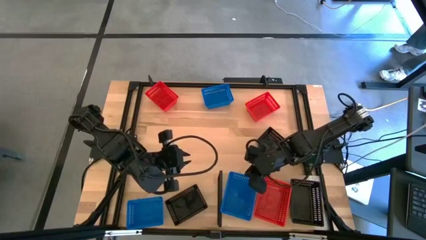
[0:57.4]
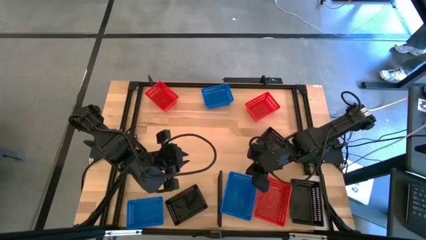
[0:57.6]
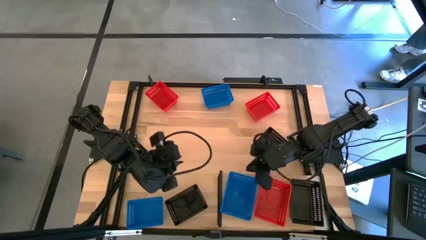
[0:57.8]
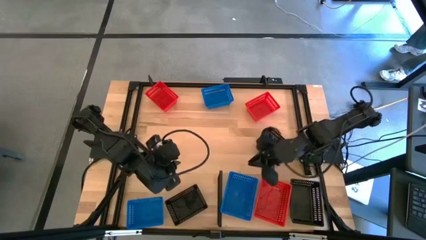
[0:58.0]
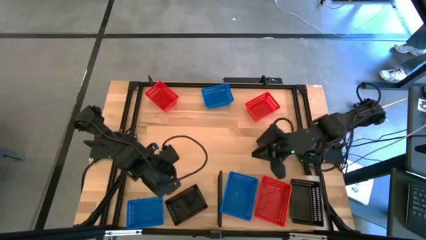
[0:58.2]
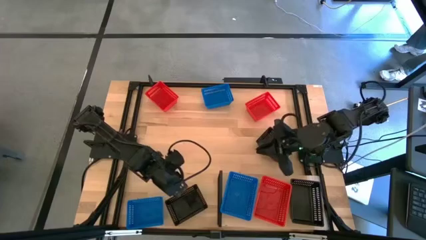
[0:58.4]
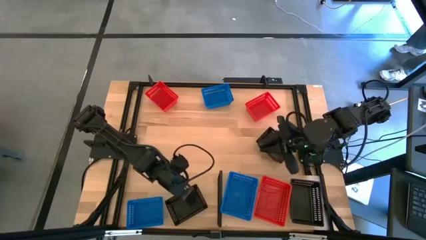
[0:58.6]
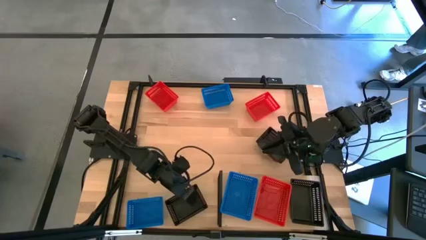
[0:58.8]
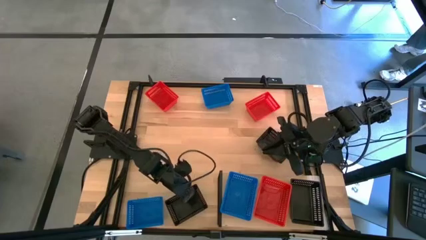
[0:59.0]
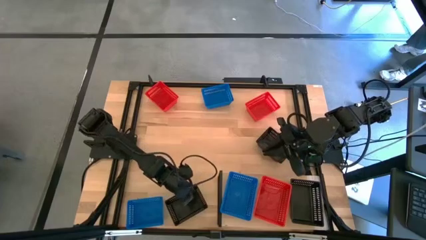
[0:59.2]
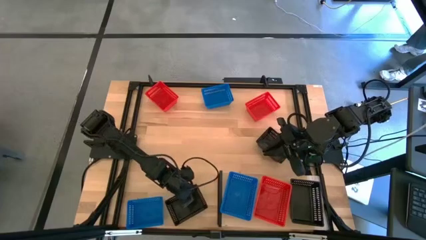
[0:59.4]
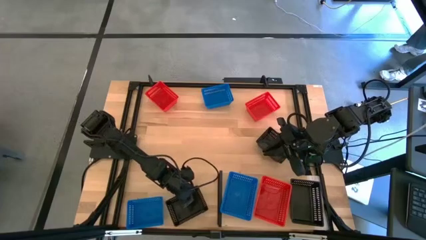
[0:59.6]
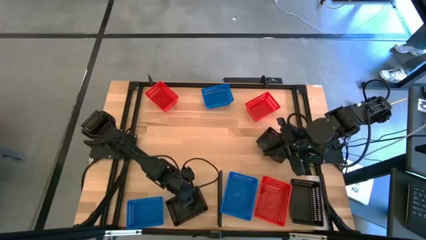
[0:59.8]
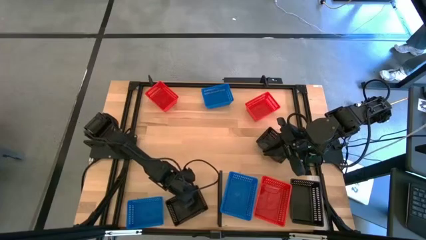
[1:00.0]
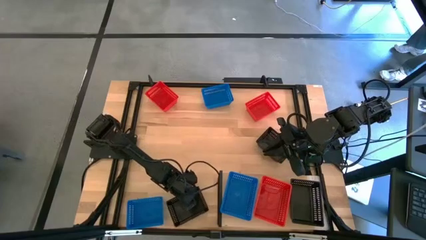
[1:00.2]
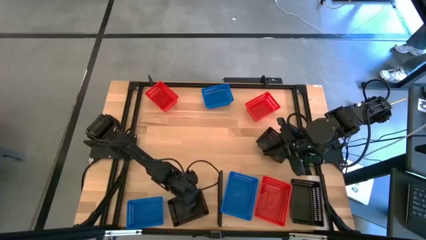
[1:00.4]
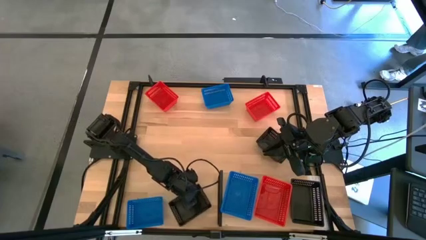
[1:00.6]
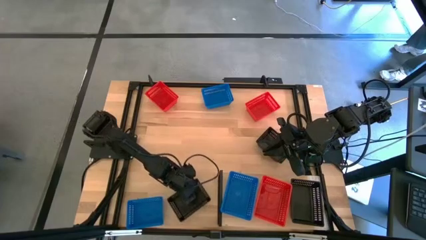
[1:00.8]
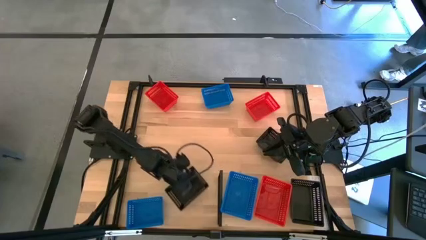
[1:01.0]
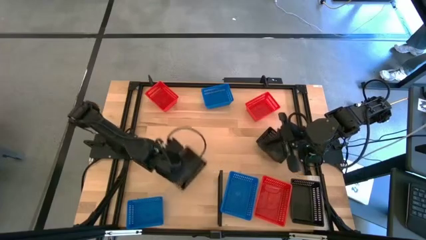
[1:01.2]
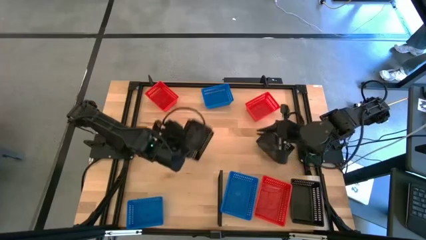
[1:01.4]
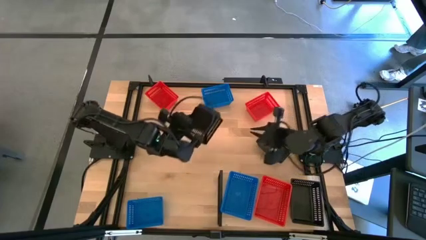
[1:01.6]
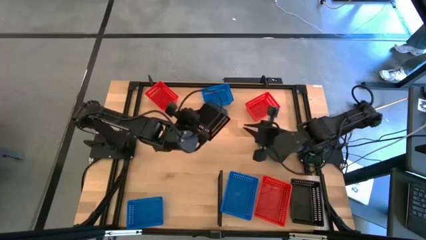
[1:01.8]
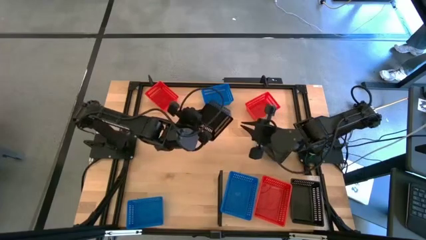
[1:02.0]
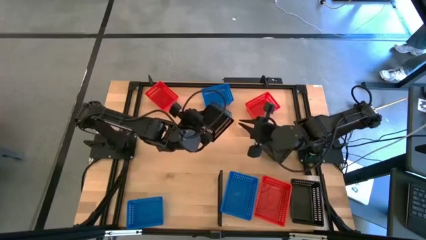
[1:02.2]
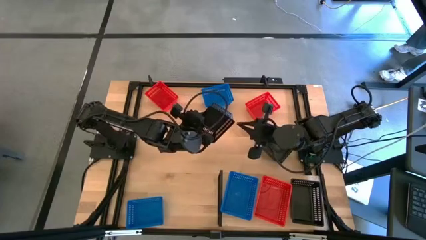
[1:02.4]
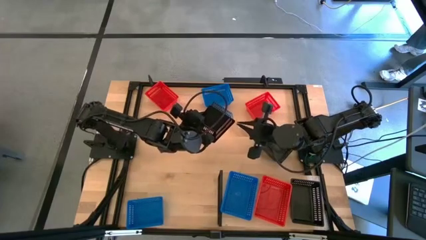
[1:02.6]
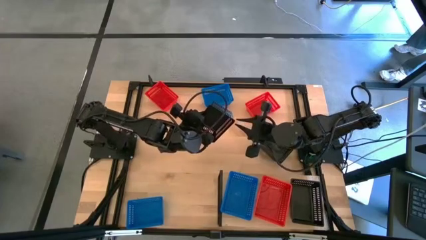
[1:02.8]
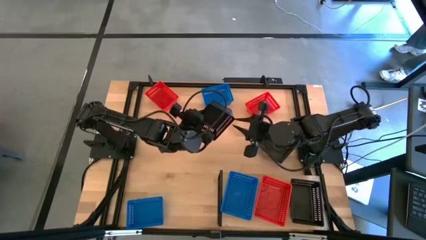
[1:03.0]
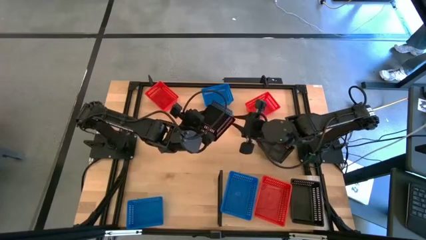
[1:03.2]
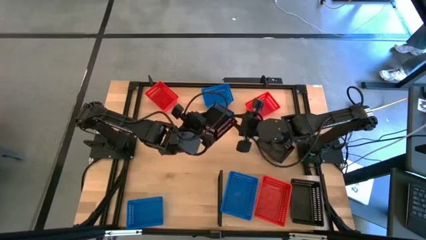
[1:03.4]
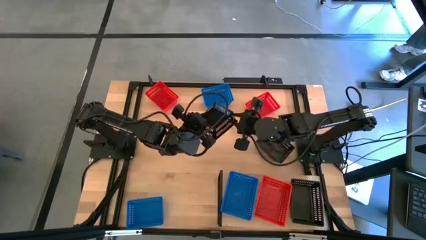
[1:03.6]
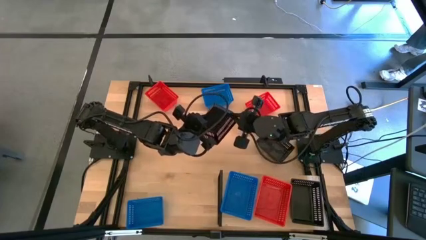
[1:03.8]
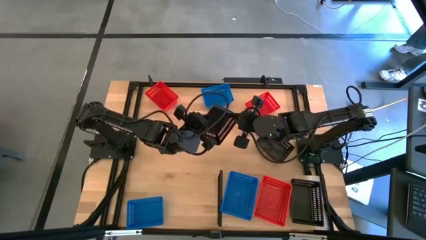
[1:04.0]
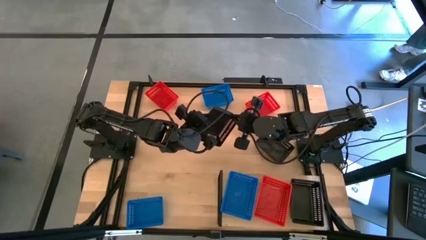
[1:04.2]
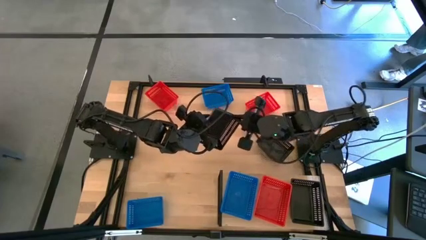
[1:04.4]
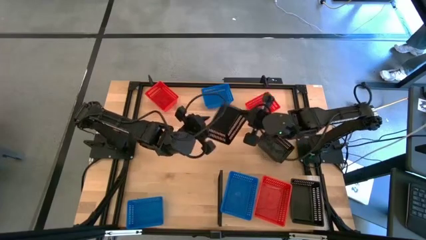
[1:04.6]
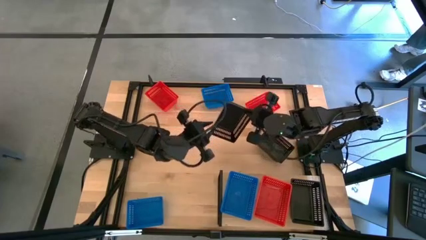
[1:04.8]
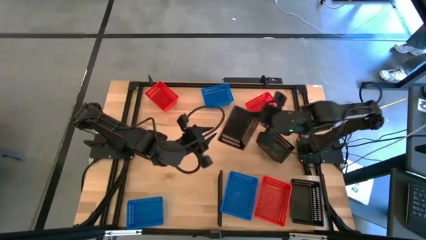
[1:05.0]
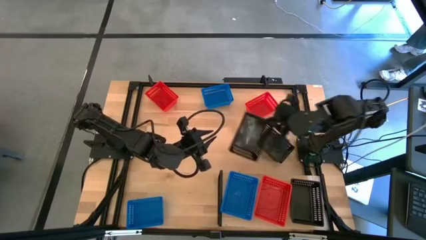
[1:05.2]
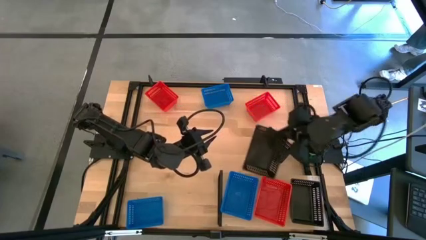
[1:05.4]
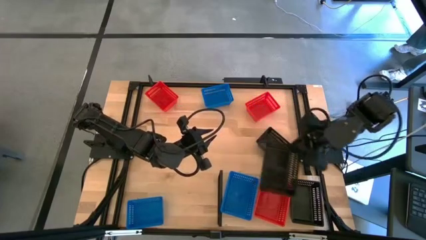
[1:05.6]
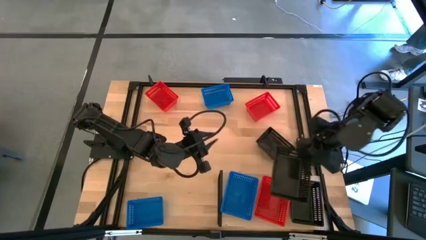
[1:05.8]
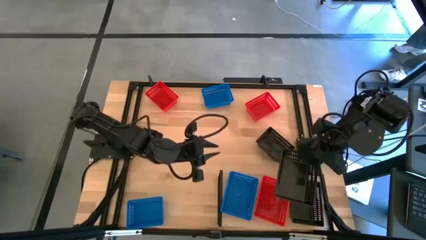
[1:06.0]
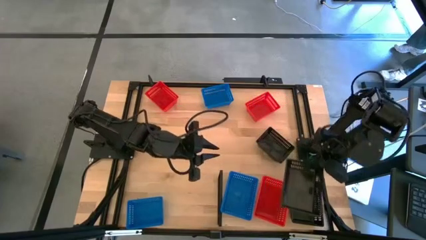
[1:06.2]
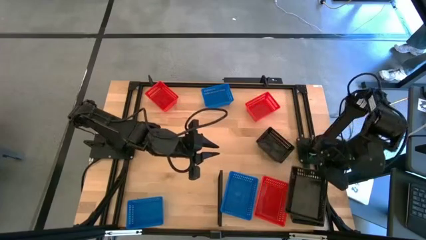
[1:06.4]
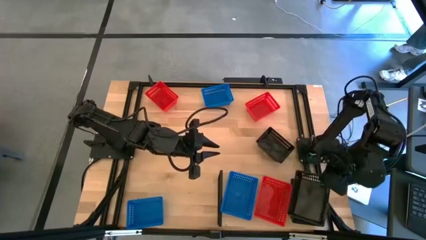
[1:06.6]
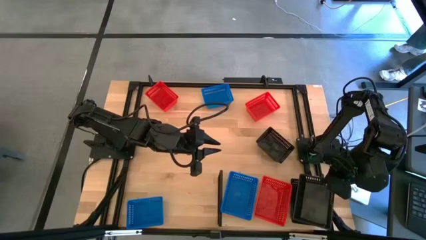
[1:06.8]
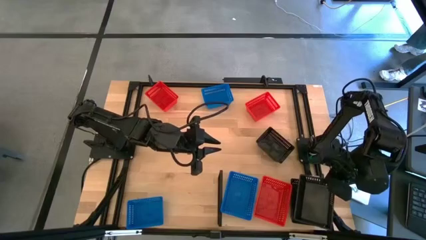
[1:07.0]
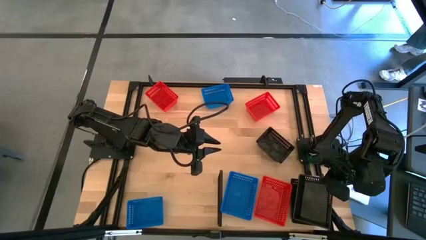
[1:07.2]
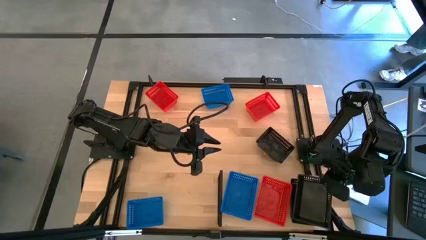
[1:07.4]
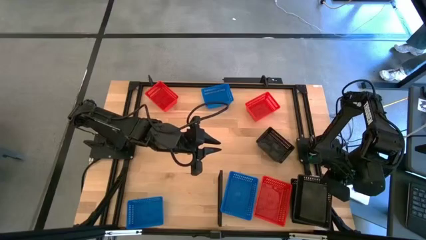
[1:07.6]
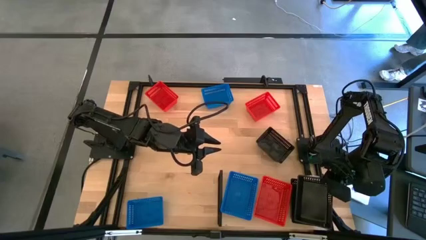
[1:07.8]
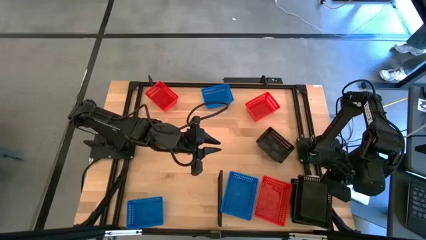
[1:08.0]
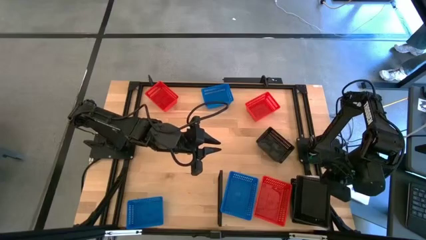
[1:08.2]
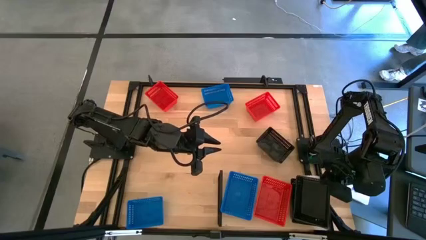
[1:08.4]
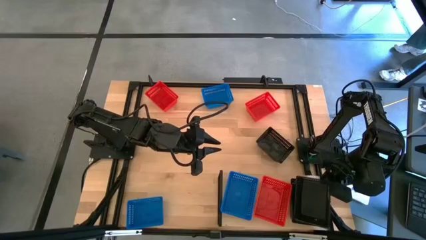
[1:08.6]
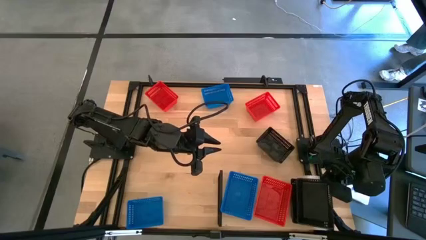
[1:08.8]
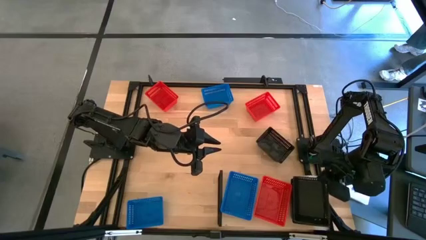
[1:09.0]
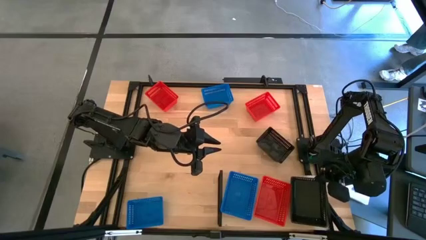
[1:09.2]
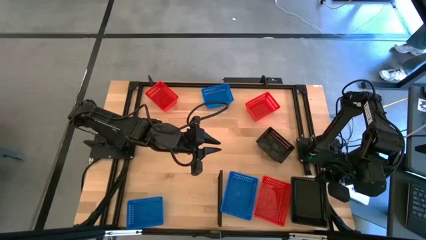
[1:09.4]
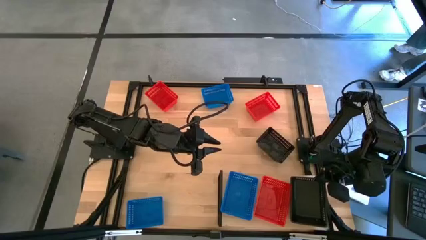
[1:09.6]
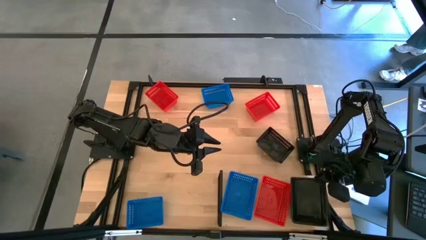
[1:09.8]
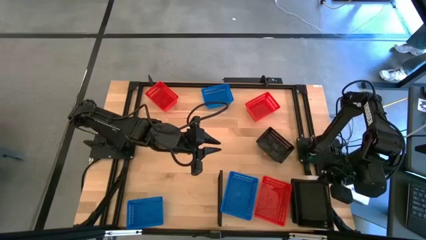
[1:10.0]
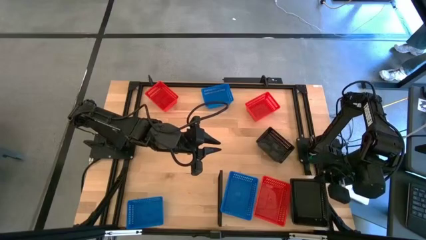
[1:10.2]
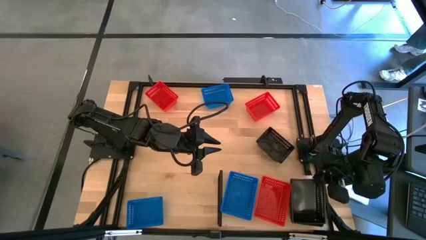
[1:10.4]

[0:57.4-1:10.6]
Task: Stack baskets on shelf by color
Stack the left black bin on top of the black bin on the shelf

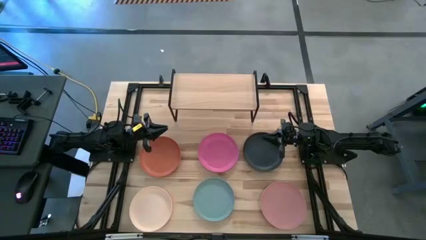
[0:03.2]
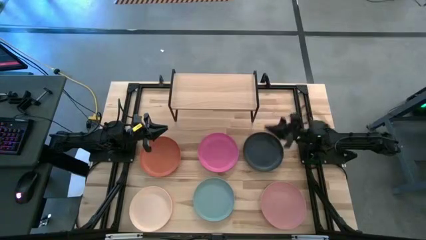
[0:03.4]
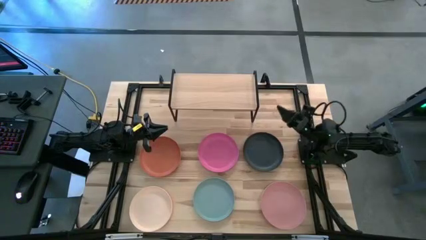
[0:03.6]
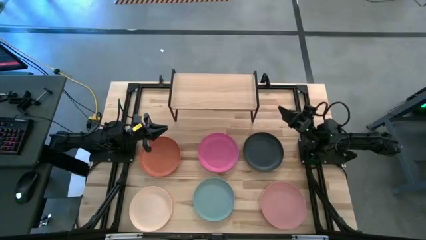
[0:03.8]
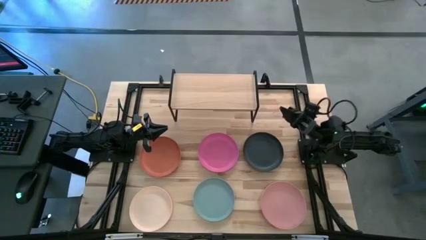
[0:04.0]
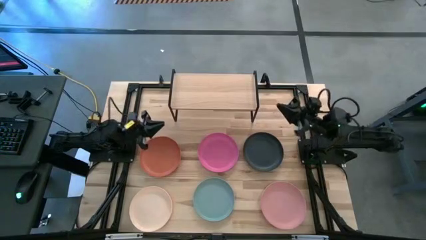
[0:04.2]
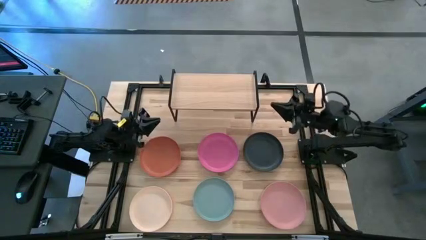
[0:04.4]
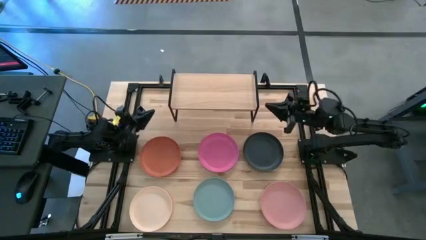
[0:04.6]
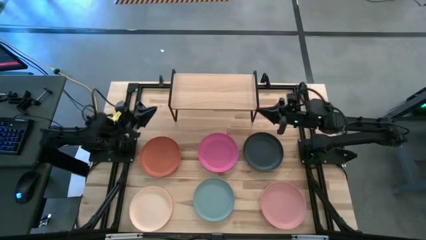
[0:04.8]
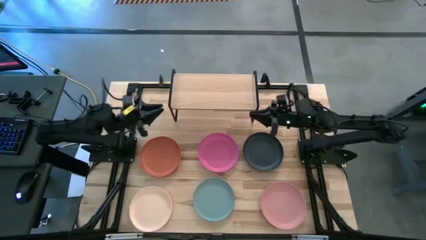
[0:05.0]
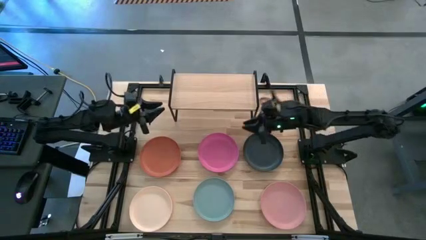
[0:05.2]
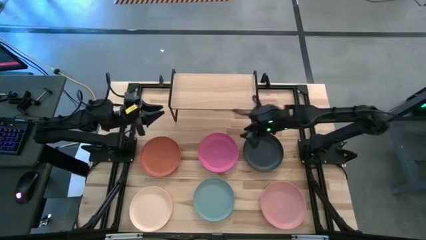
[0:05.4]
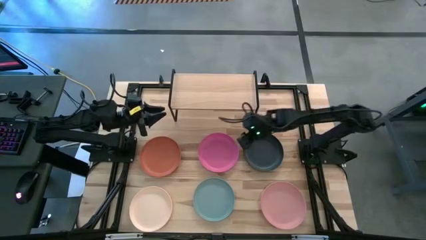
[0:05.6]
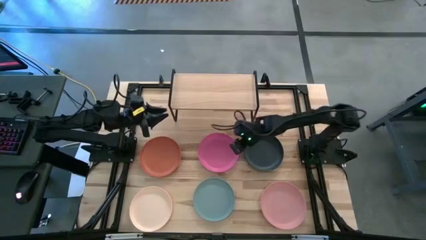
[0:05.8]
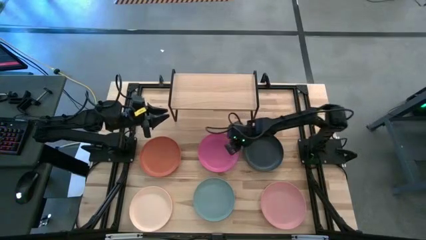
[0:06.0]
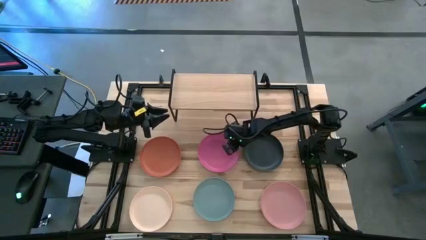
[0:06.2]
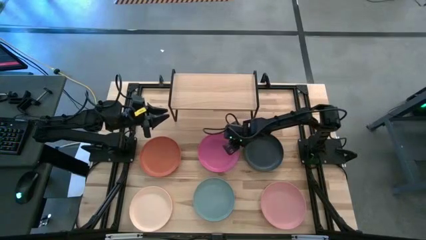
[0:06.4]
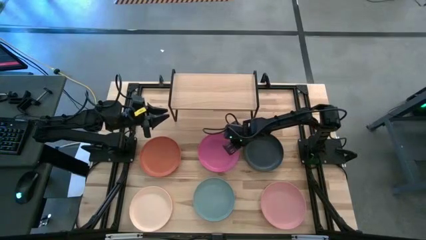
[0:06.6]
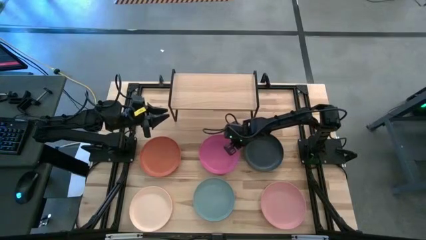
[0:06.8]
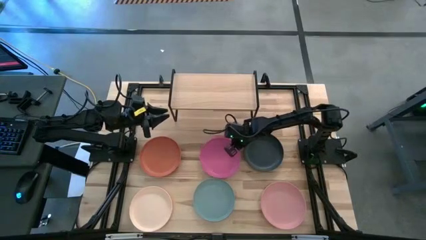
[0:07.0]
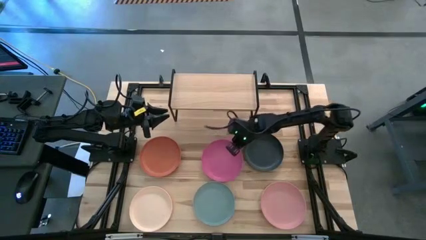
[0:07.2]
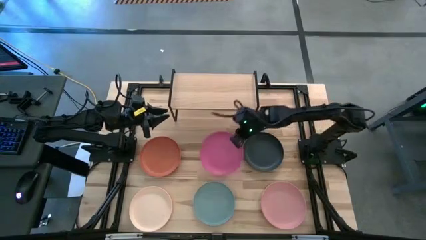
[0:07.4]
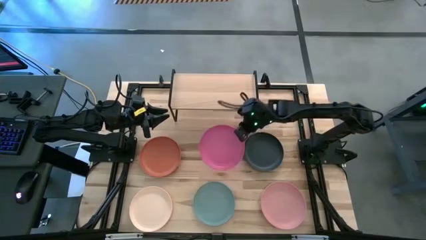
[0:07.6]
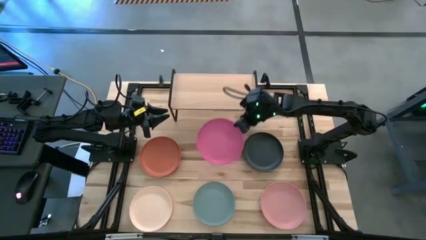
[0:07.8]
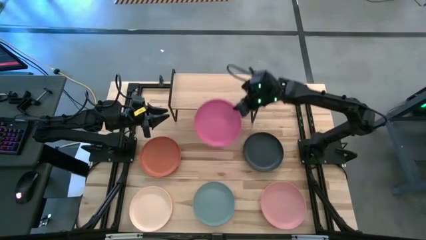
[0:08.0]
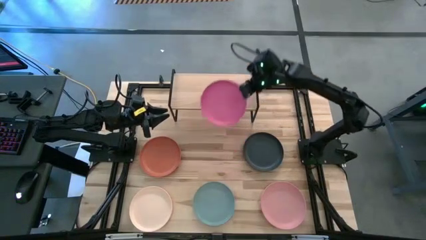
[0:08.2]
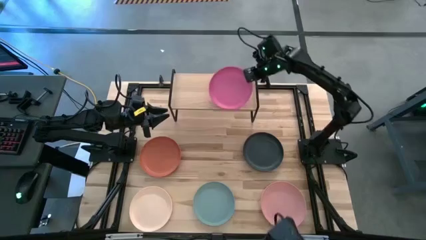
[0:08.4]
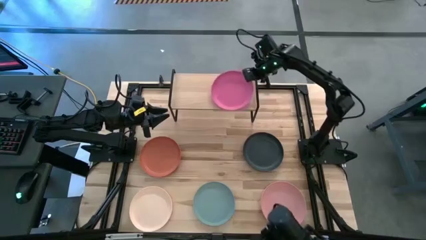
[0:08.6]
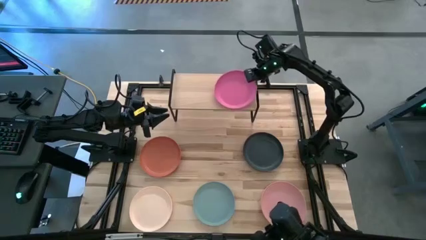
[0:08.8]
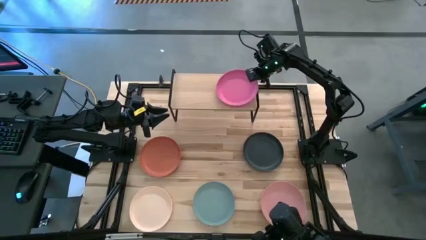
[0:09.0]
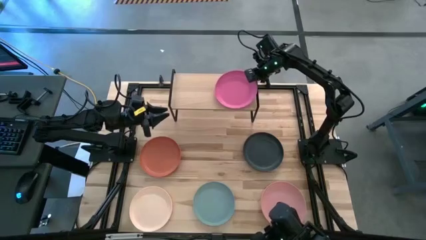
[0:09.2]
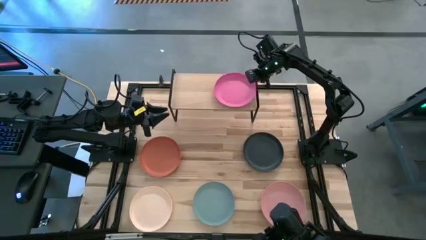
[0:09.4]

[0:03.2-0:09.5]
Task: Place and stack plates onto a shelf
Put the pink plate on the shelf
